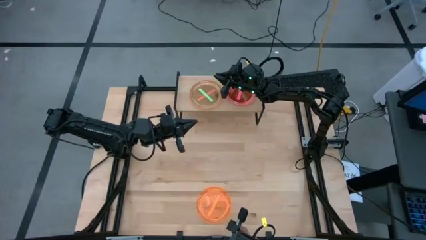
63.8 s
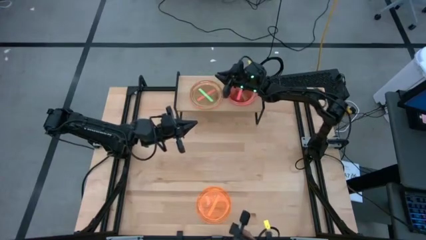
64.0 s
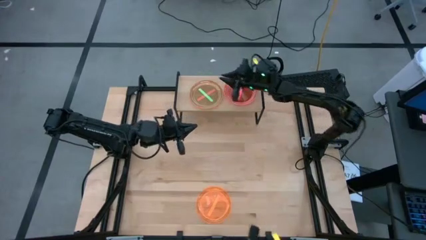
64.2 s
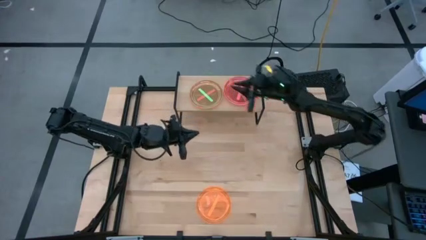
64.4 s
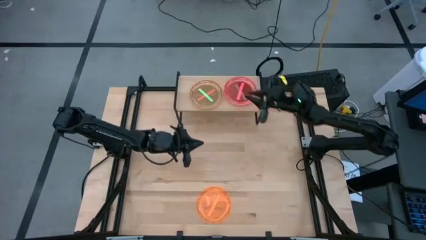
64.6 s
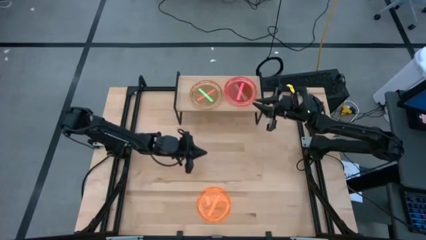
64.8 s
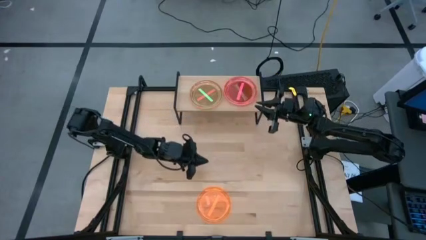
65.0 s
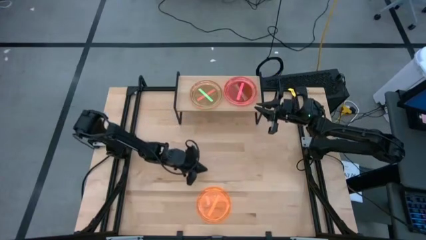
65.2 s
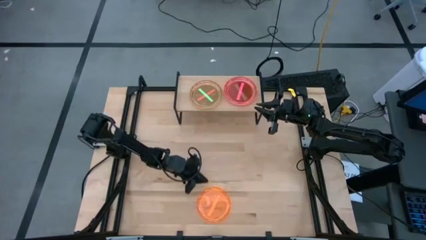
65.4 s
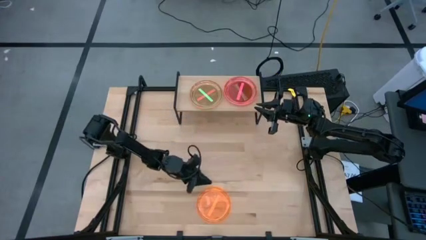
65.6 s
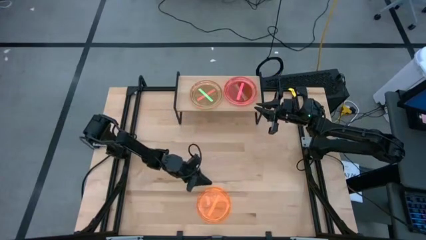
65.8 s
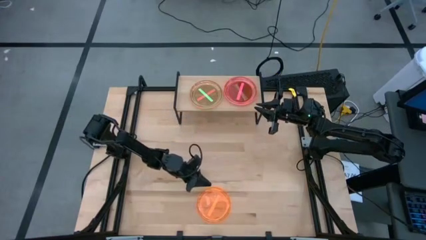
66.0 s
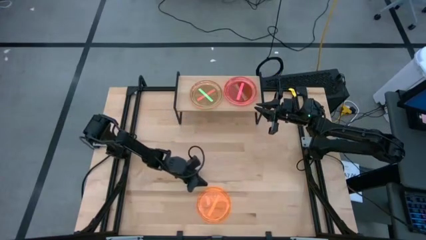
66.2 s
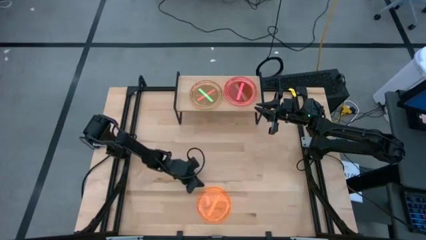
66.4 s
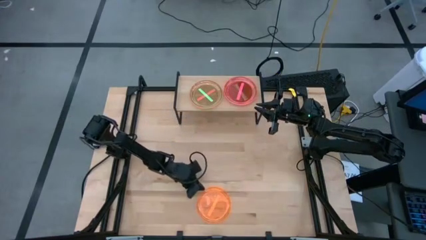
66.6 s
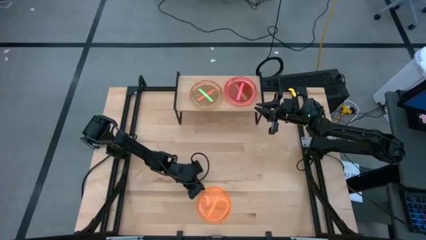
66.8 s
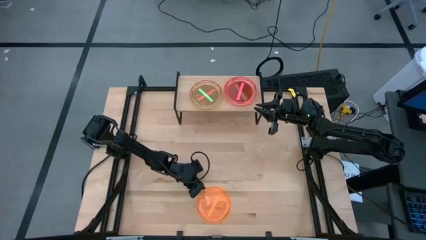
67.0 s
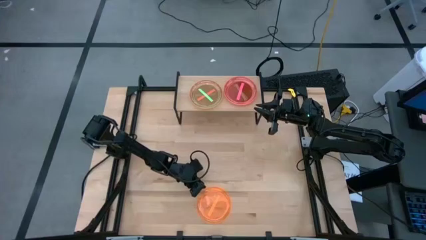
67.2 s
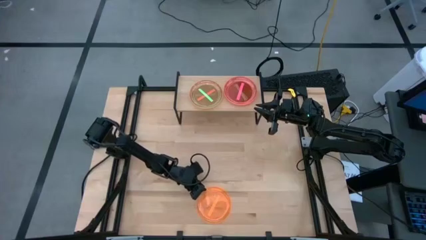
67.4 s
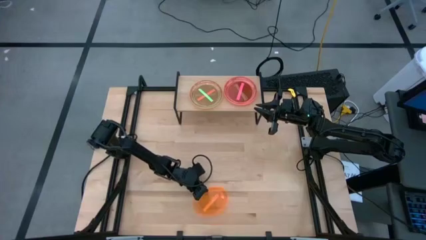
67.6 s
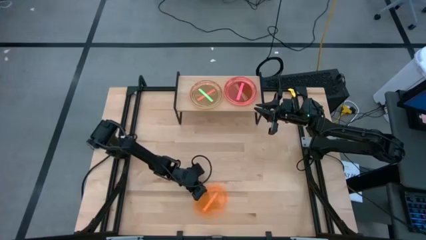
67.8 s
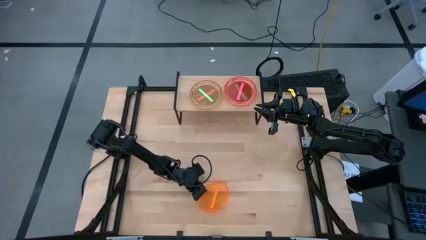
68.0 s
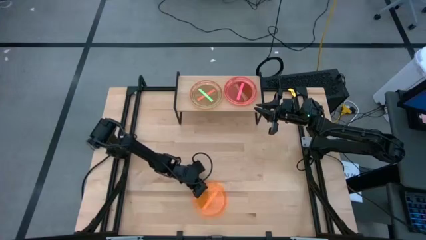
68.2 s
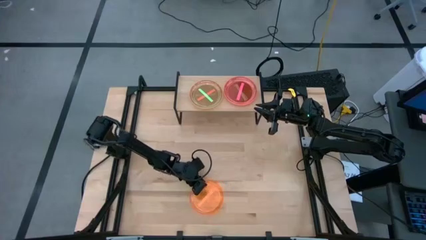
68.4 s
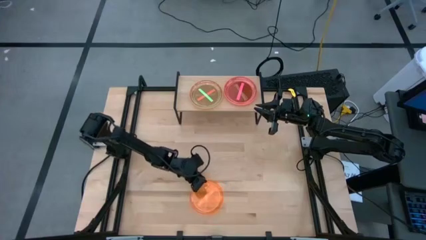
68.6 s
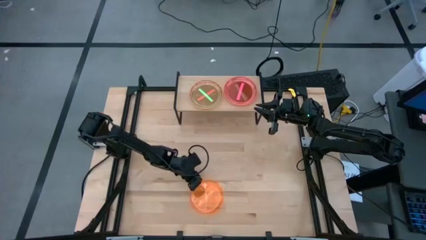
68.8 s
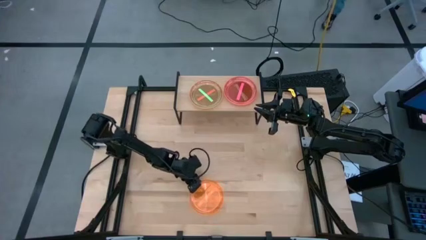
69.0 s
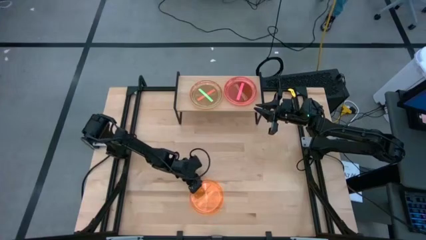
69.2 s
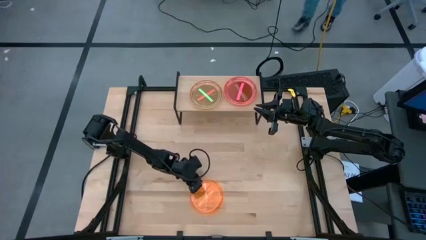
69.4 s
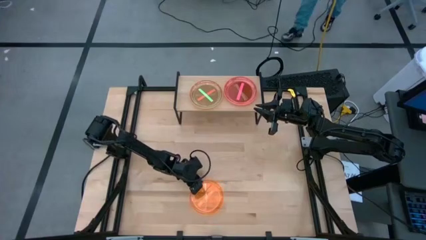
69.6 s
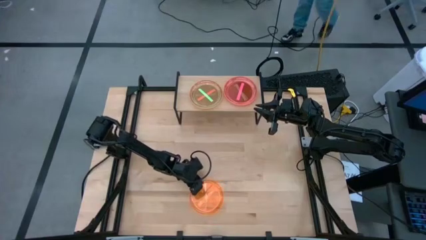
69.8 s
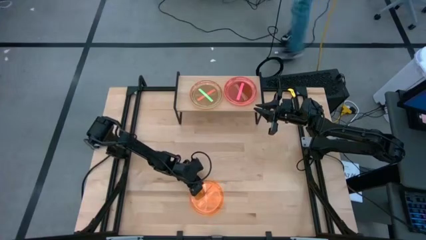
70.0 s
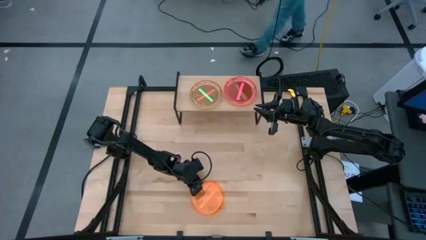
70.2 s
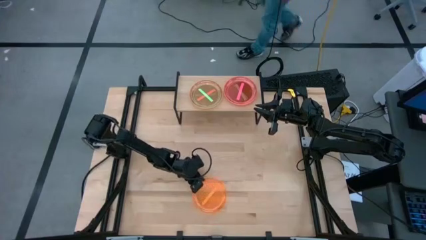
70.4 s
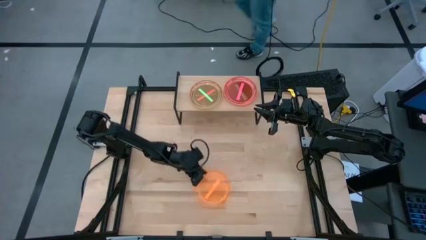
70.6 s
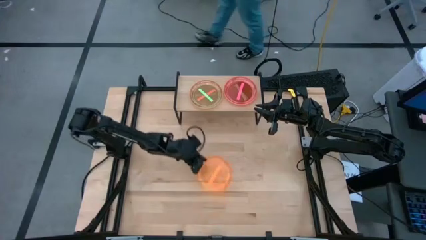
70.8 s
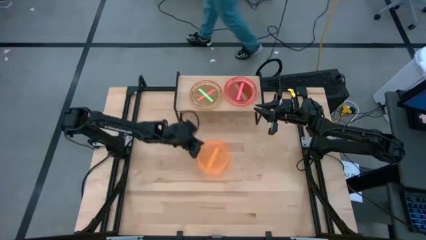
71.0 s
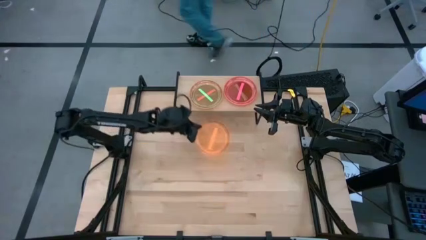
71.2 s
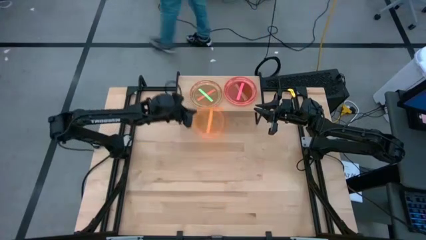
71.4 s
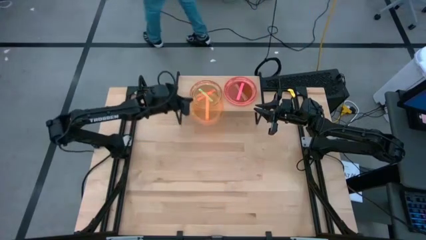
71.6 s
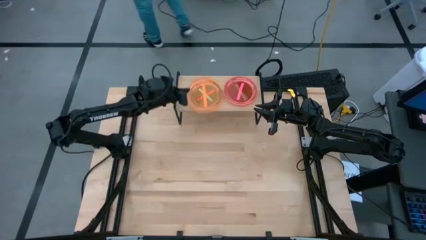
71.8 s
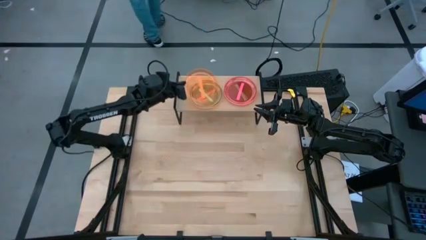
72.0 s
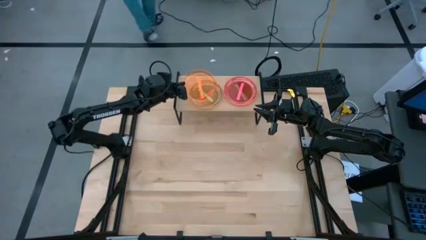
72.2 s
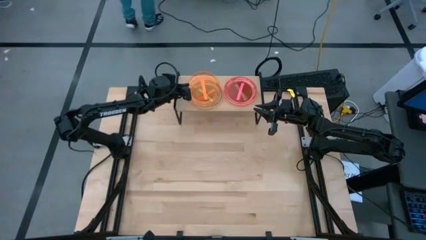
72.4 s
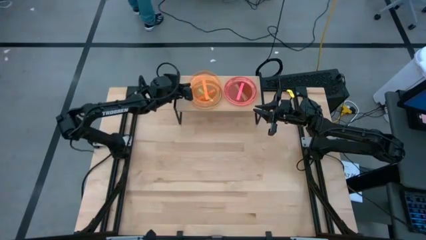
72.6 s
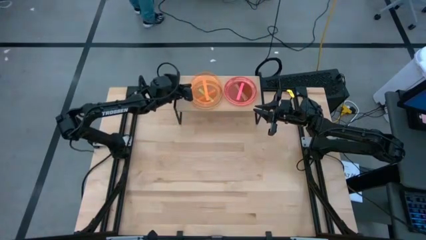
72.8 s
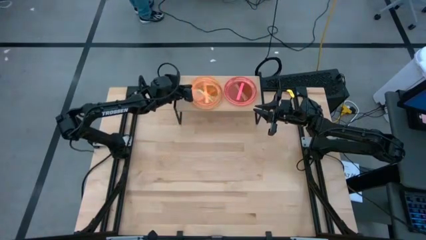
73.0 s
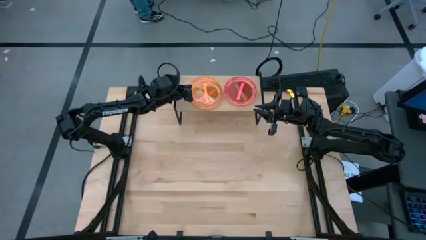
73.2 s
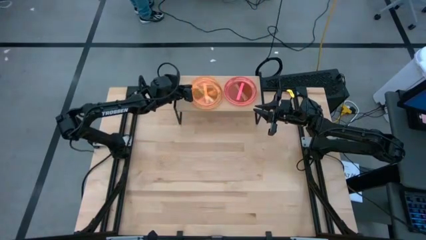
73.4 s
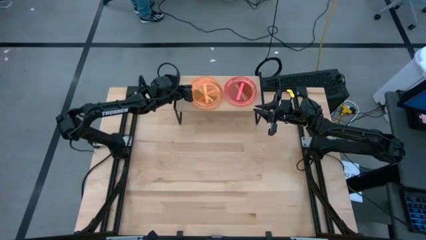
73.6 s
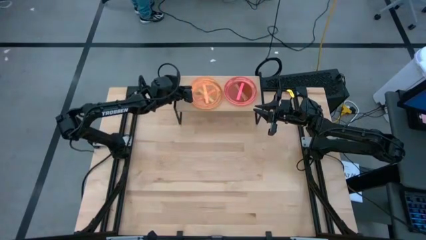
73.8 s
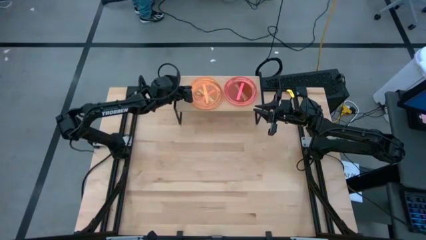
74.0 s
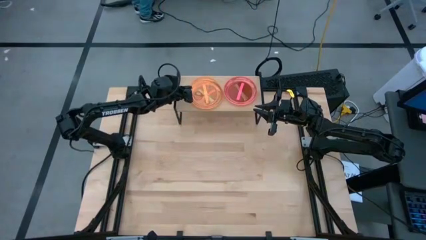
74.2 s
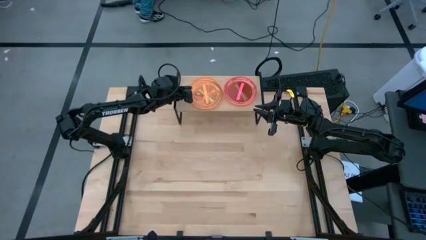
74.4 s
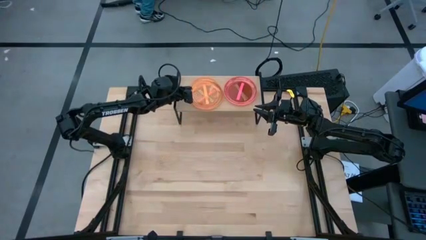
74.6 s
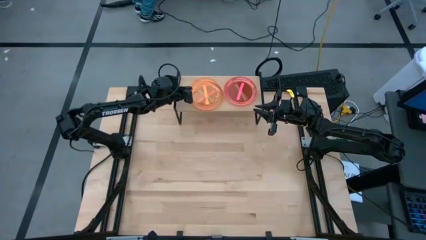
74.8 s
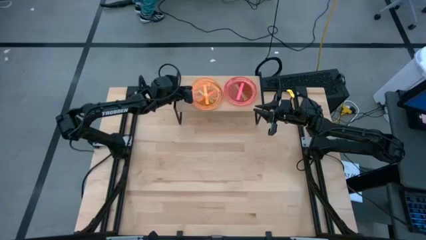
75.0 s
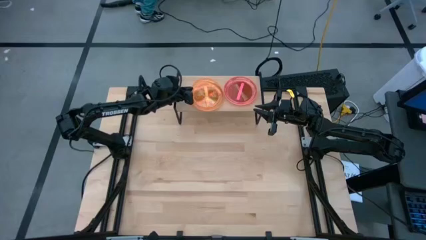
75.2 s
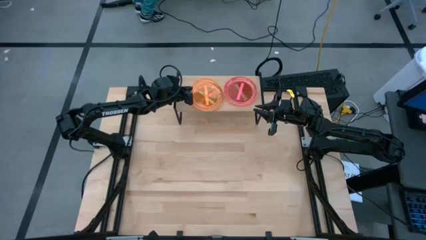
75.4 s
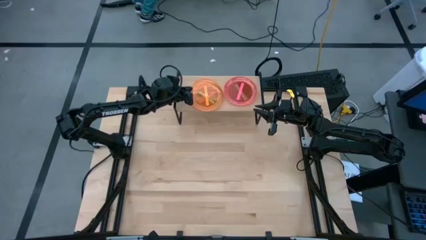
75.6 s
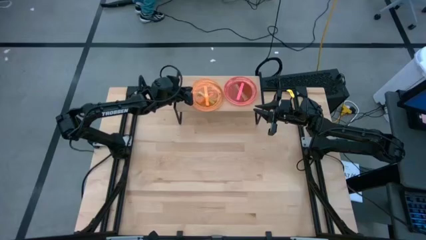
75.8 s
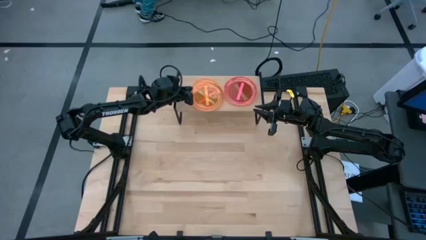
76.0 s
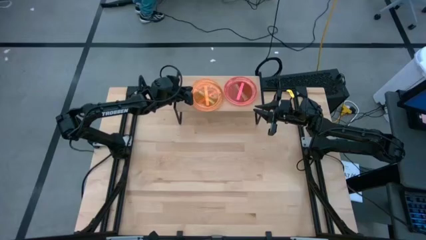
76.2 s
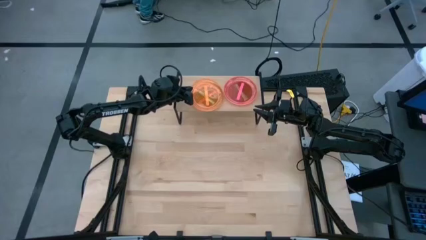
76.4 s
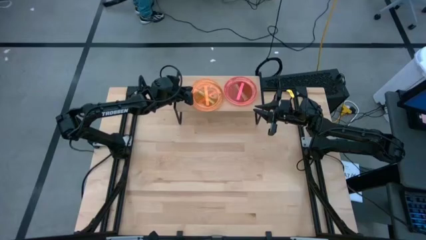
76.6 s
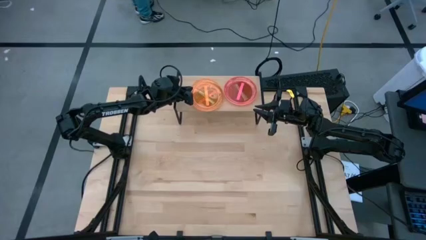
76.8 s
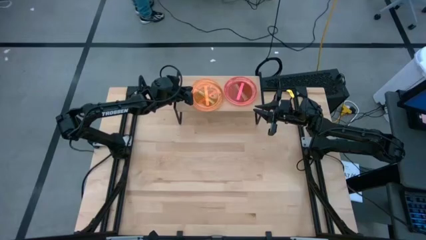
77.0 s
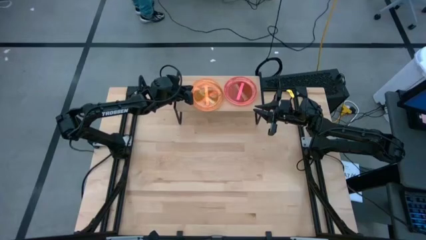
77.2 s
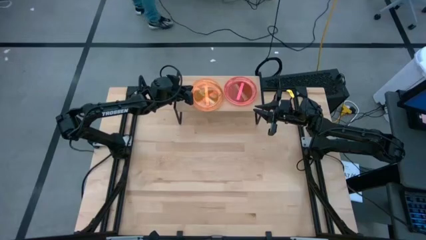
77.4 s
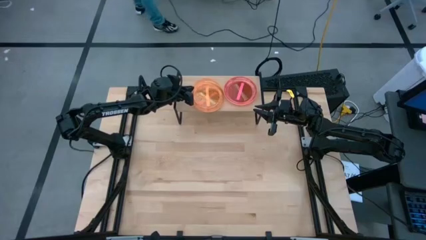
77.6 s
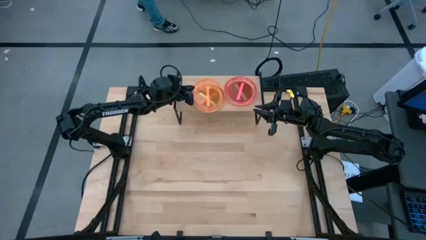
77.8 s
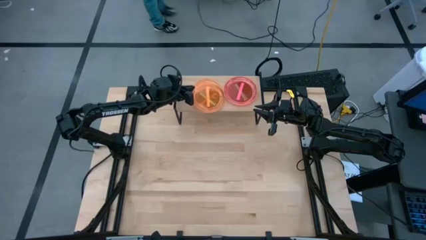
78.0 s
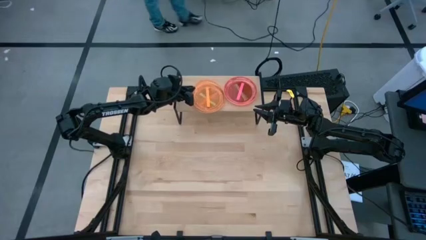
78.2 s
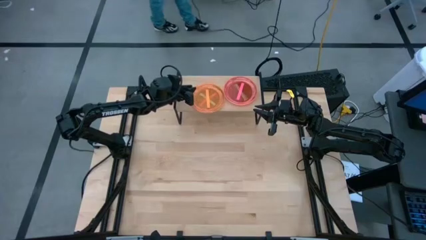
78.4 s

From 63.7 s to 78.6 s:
Task: Place and stack plates onto a shelf
Stack the orange plate on top of the green plate on the shelf

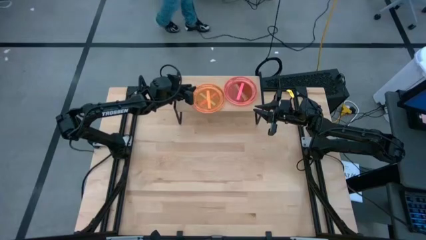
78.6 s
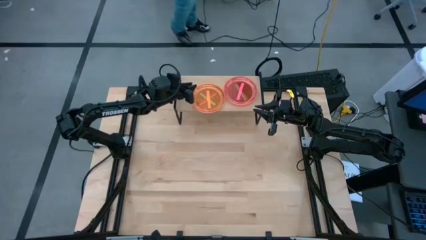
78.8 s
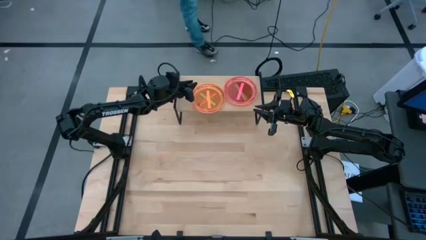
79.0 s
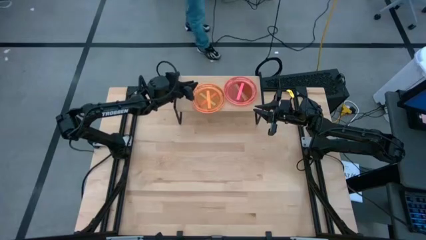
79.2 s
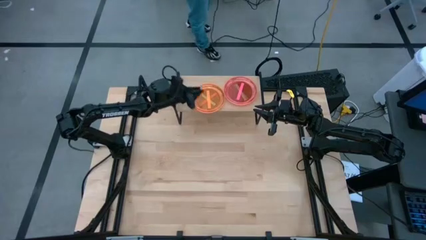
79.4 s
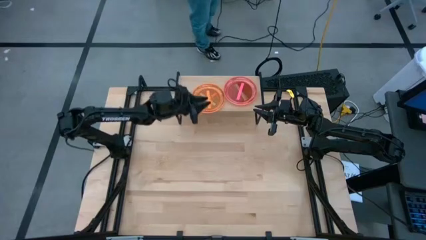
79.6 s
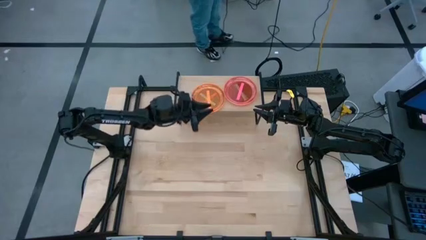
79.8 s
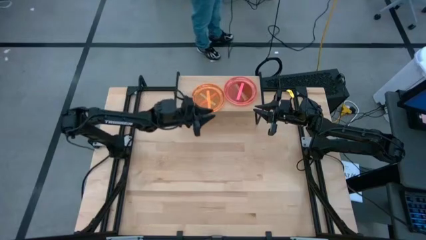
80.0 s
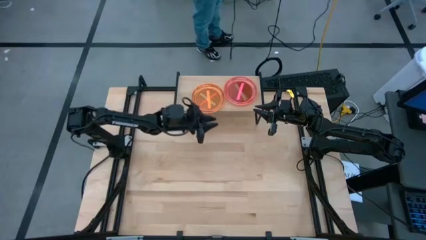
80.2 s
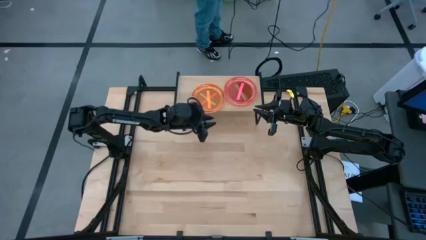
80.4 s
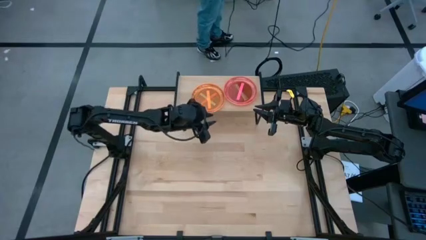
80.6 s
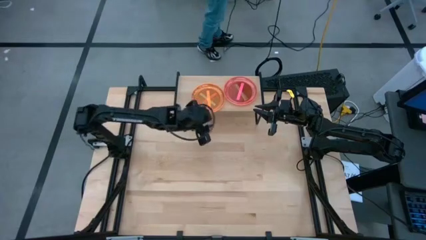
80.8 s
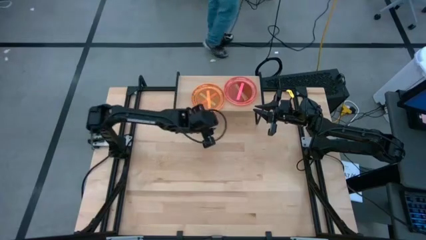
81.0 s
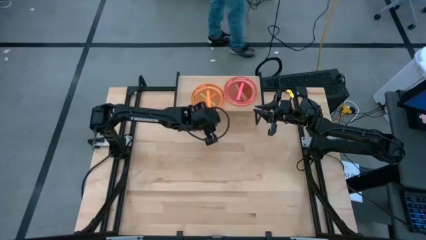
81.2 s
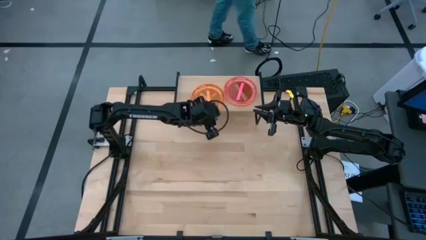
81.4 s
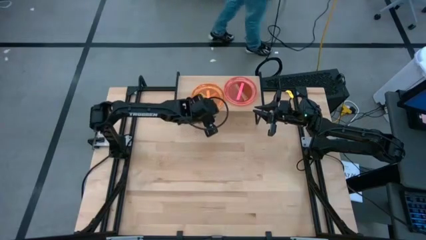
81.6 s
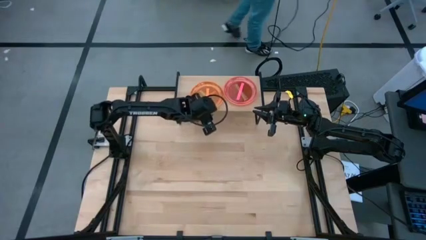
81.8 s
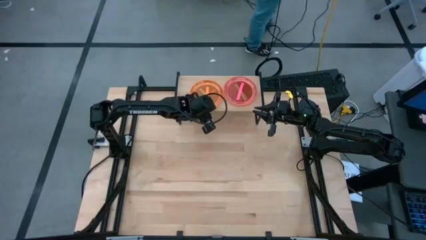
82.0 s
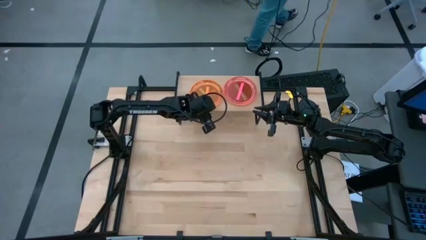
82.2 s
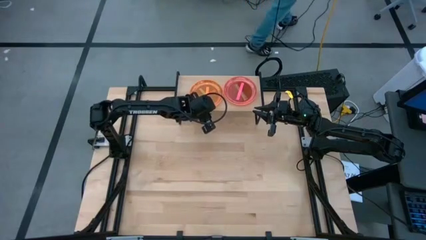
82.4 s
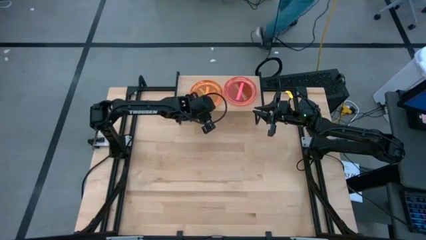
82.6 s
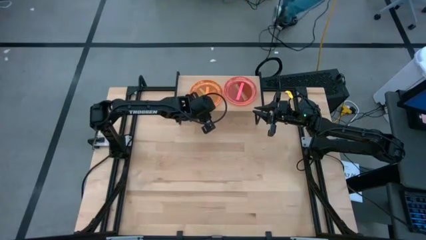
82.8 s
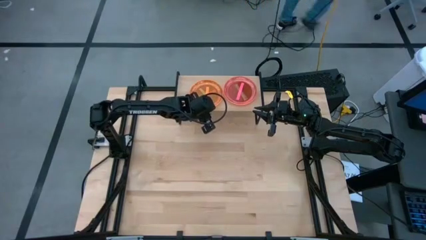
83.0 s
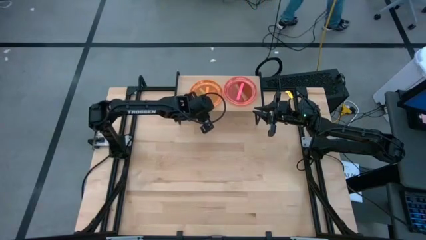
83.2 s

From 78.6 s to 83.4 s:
Adjust the stack plates on the shelf
